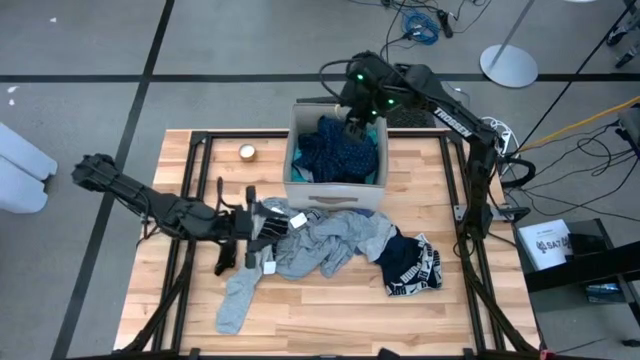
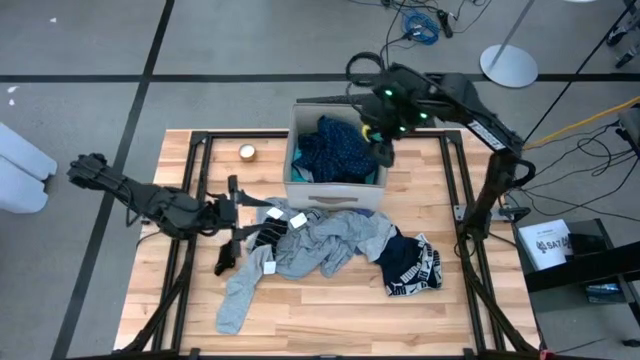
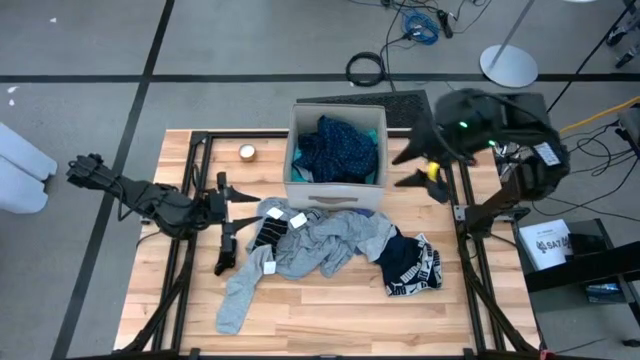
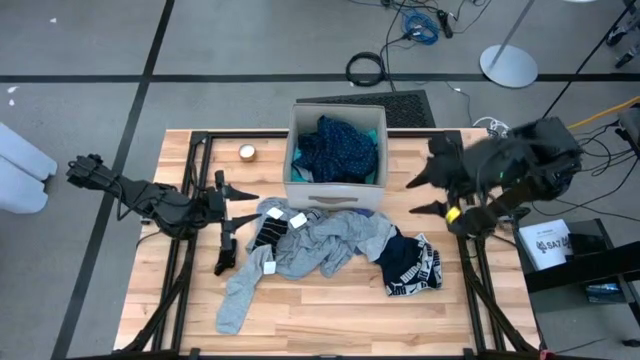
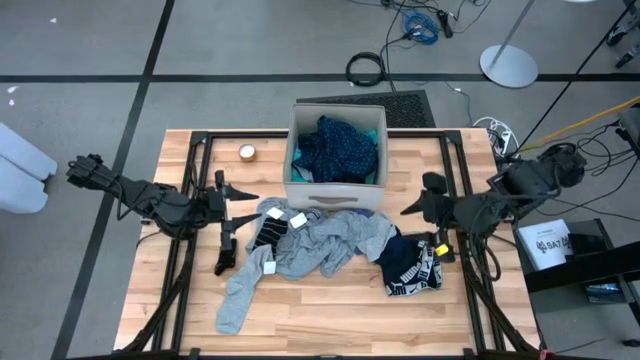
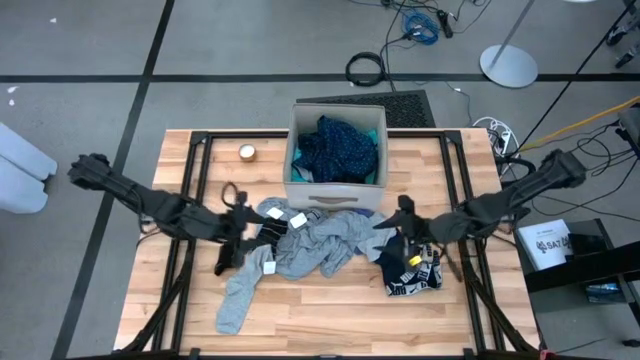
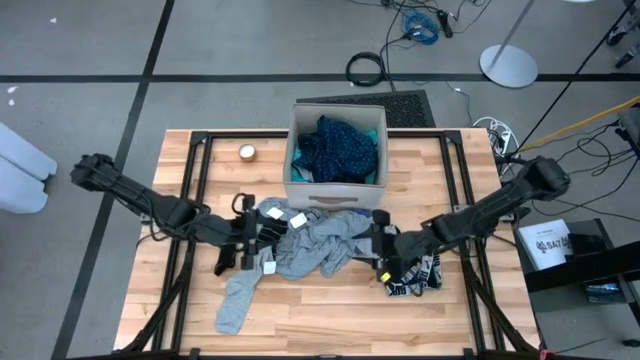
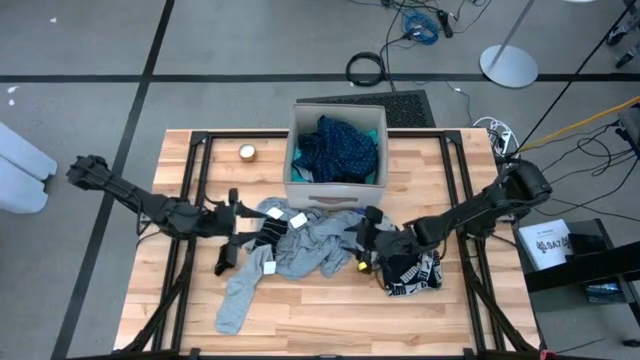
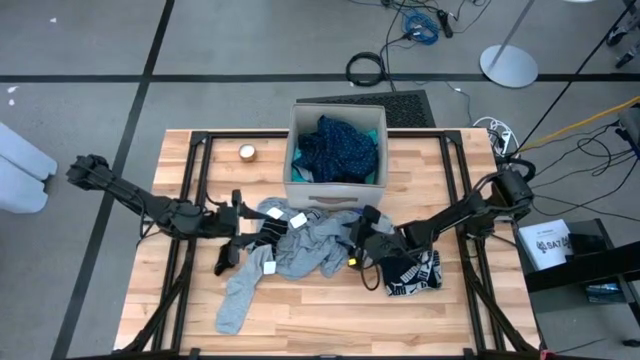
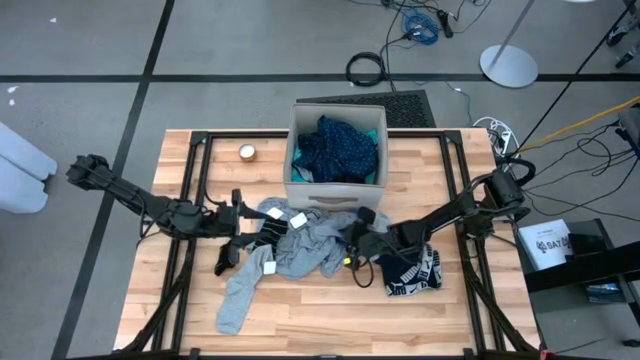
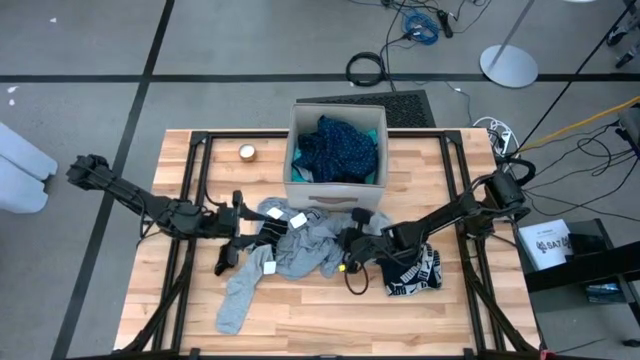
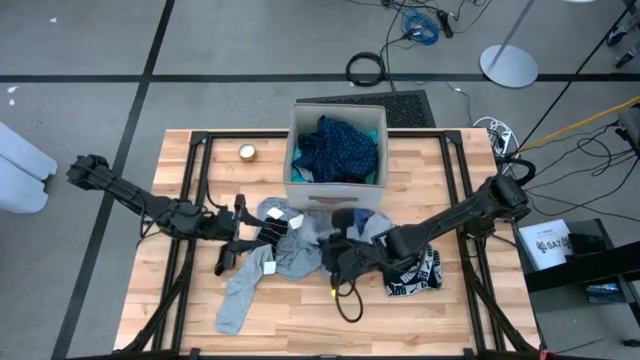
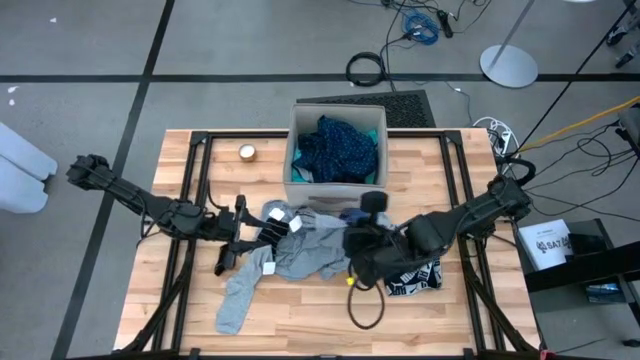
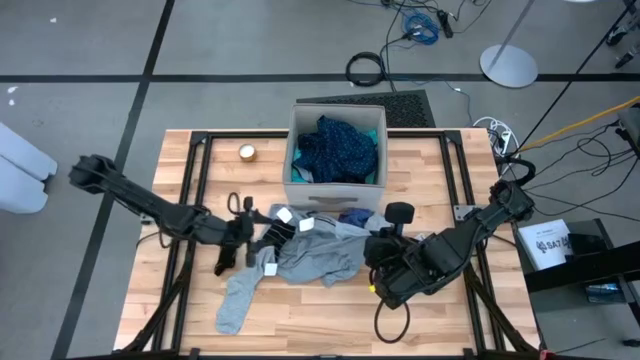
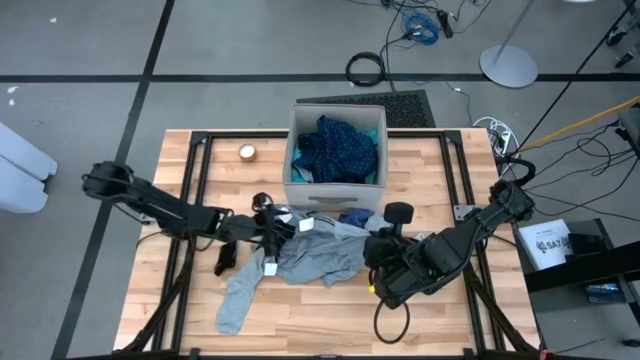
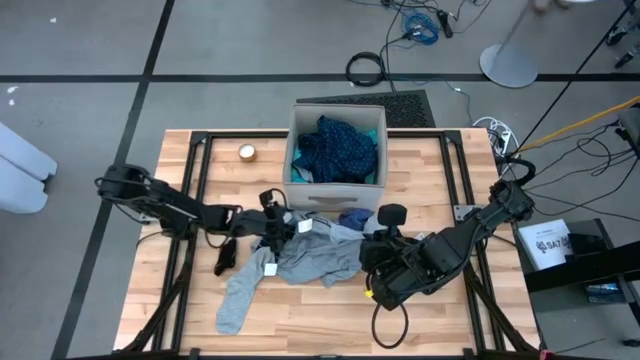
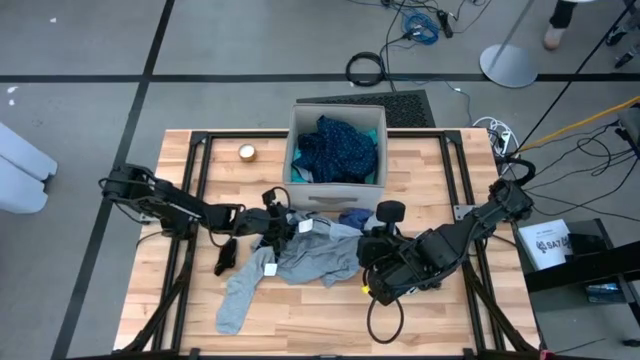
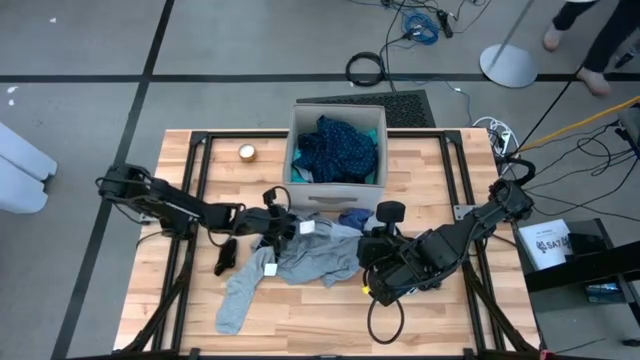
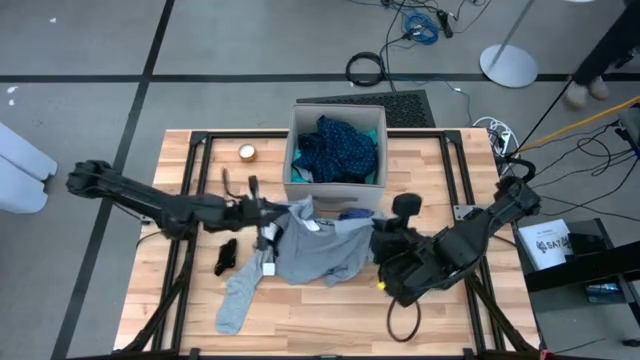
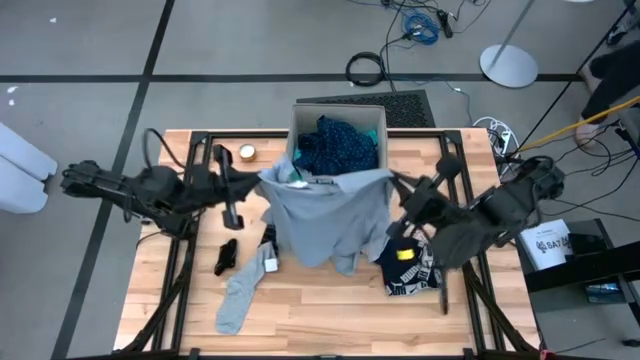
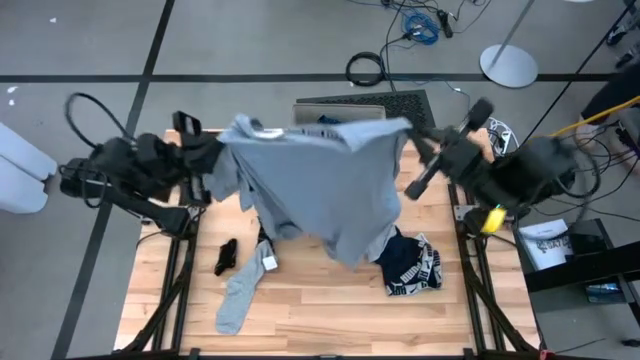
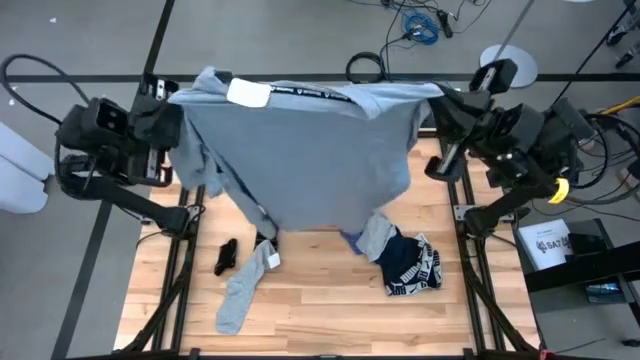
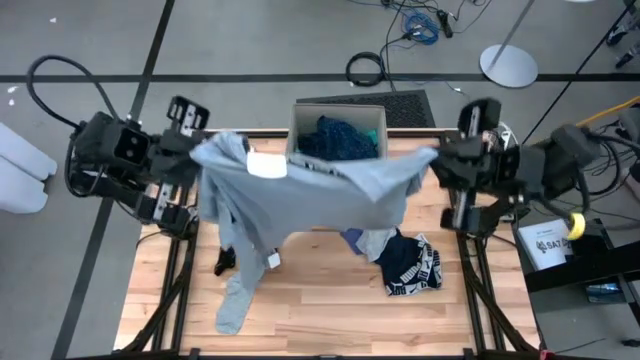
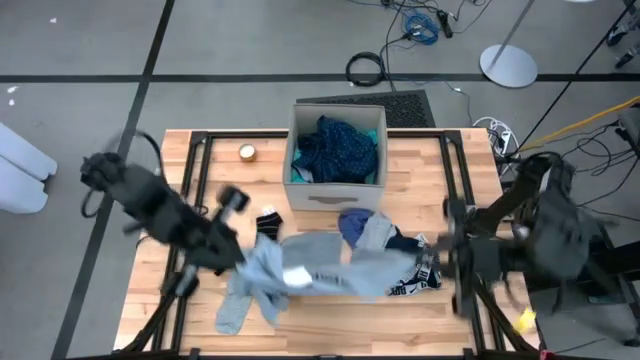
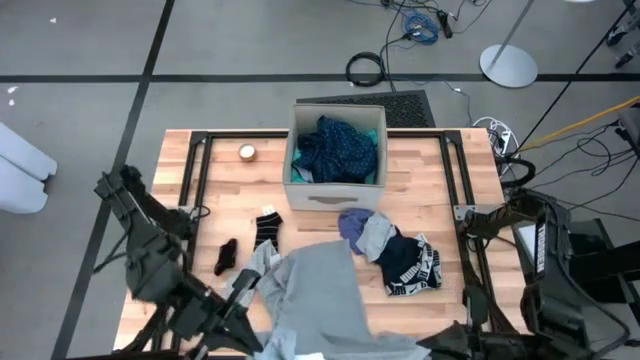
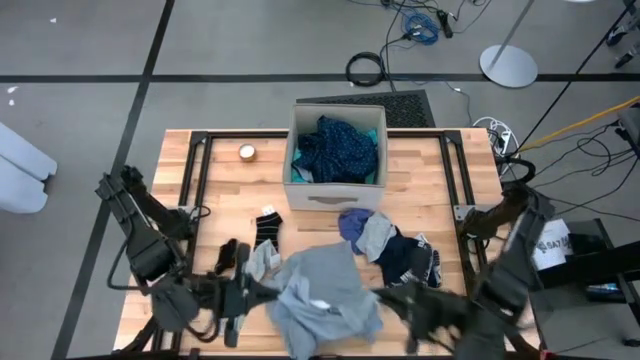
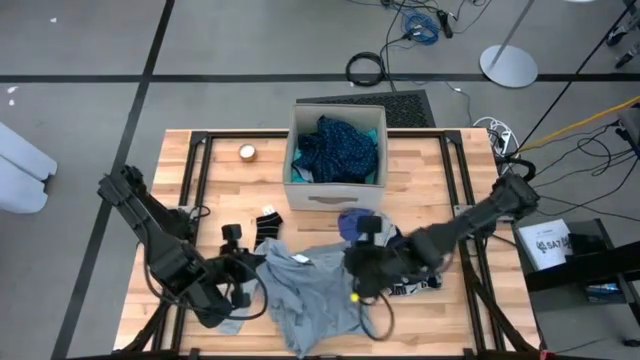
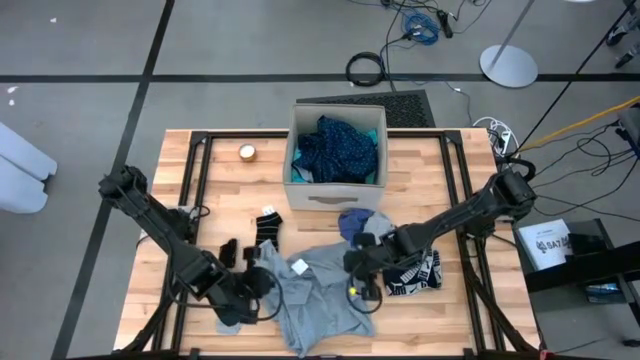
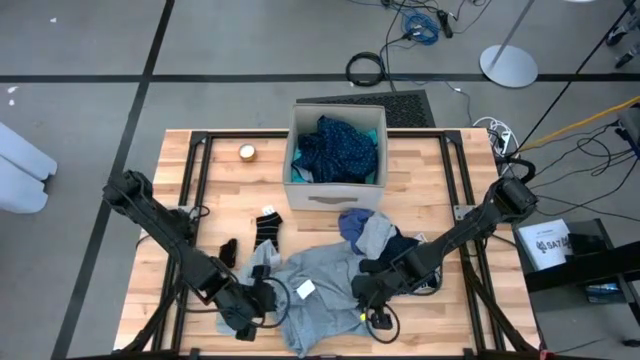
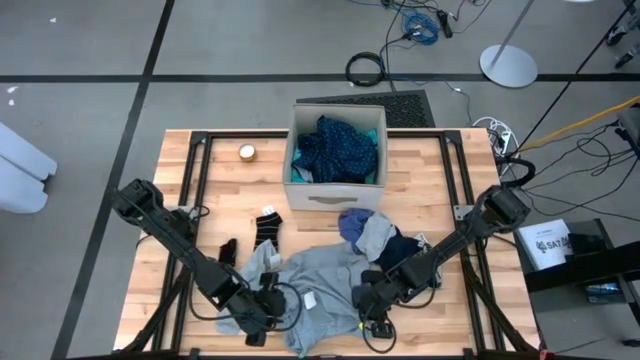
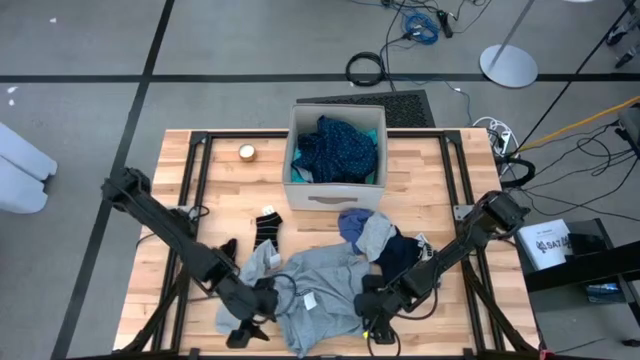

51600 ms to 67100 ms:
Task: Sort clothes
Put the gray shirt into the laundry organizer

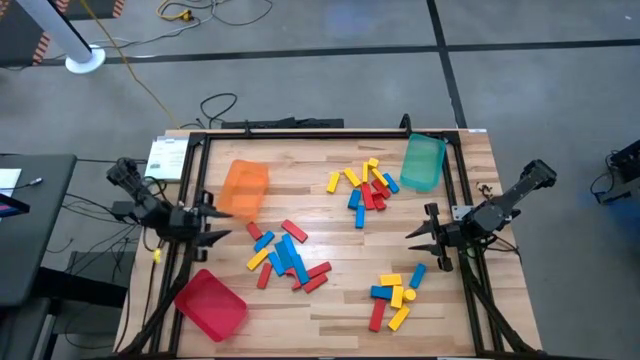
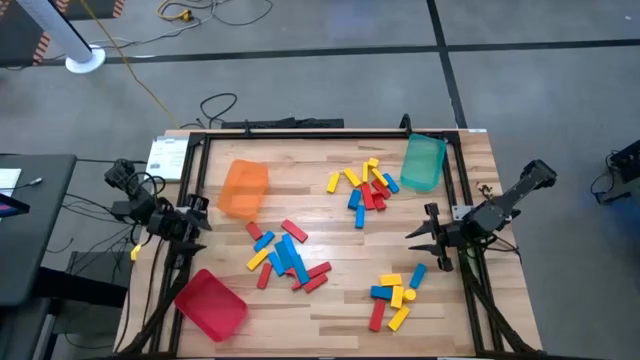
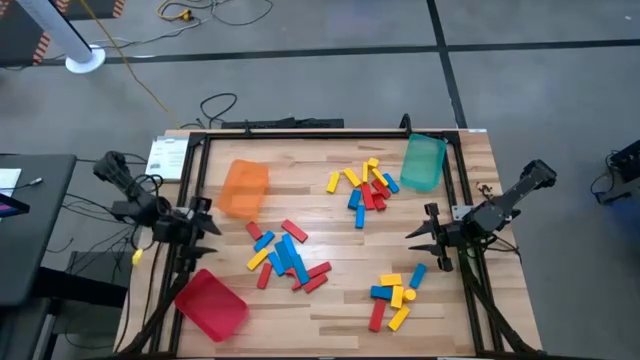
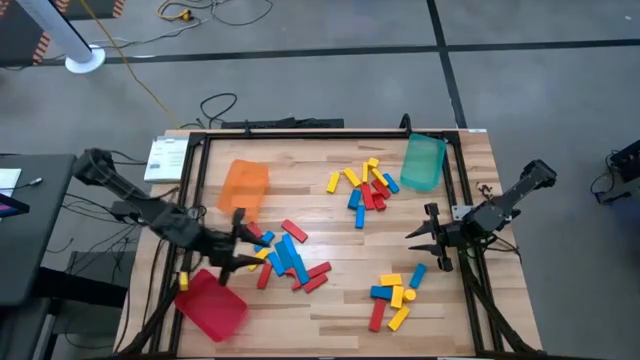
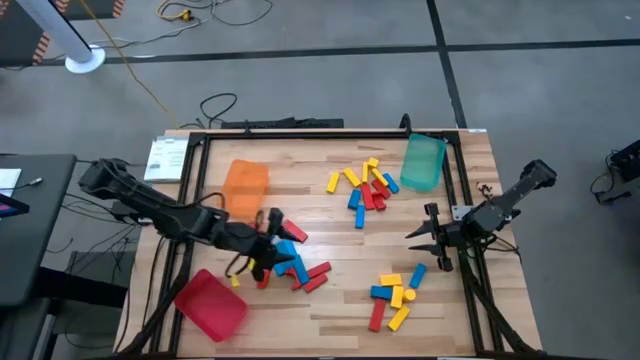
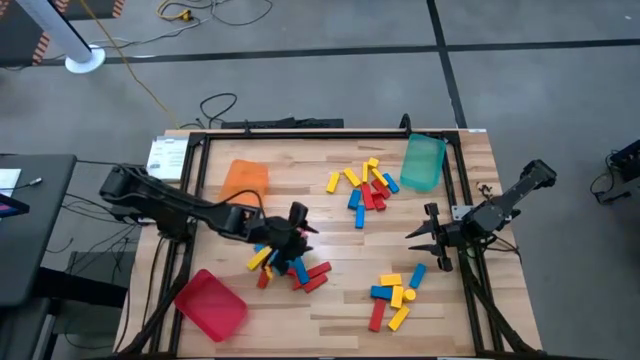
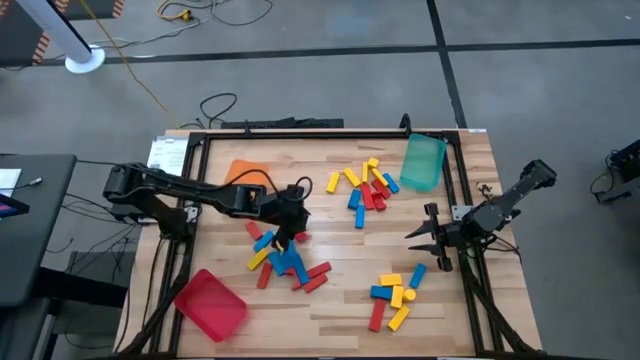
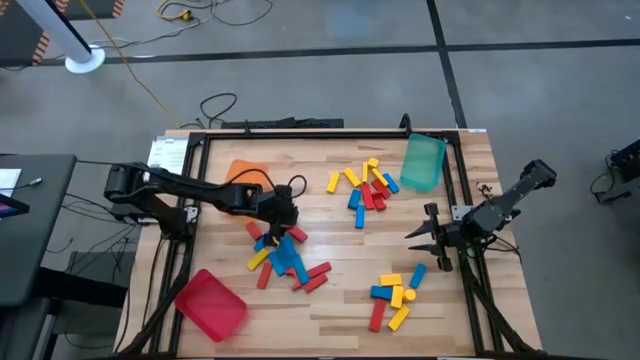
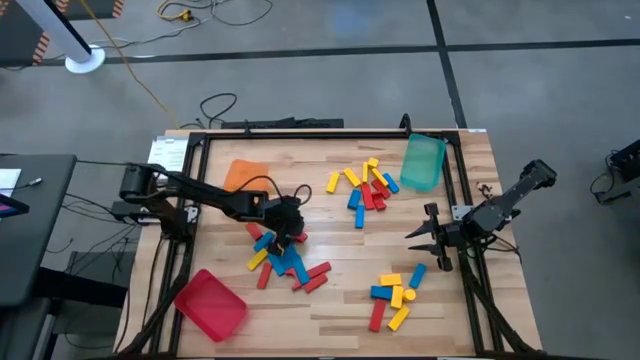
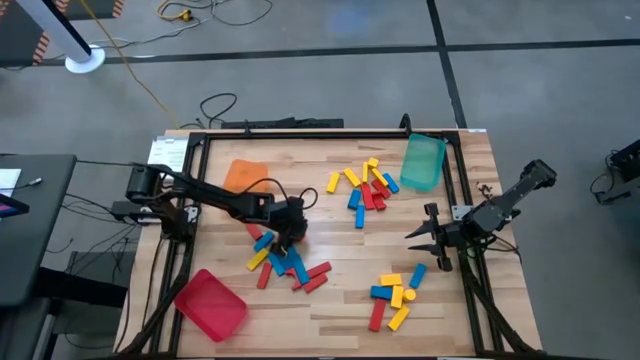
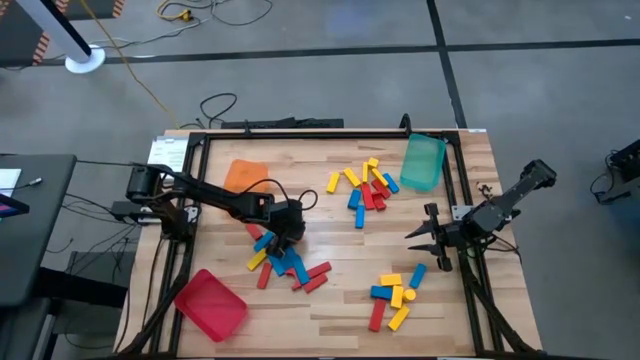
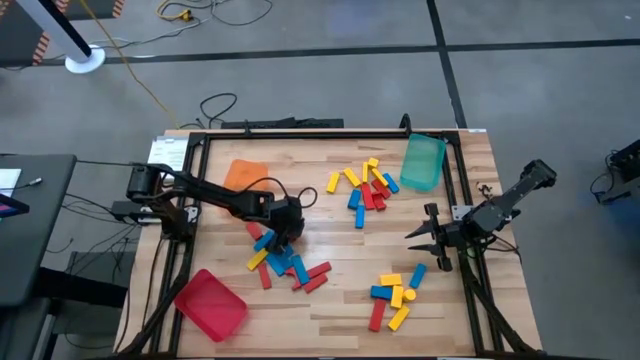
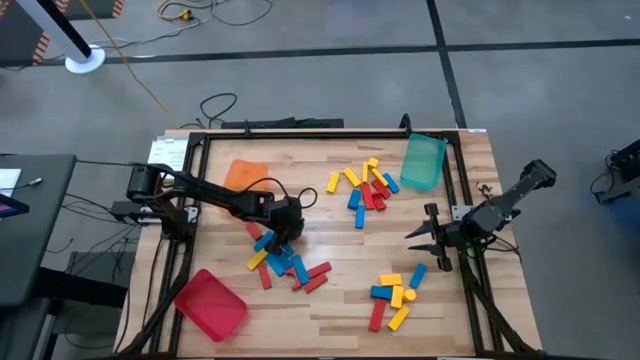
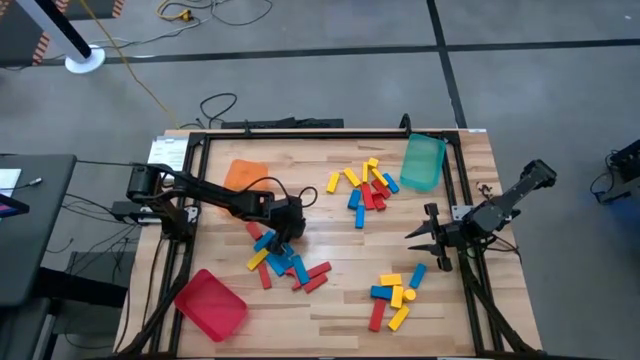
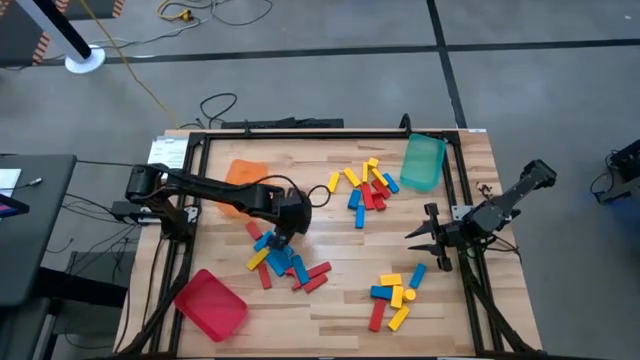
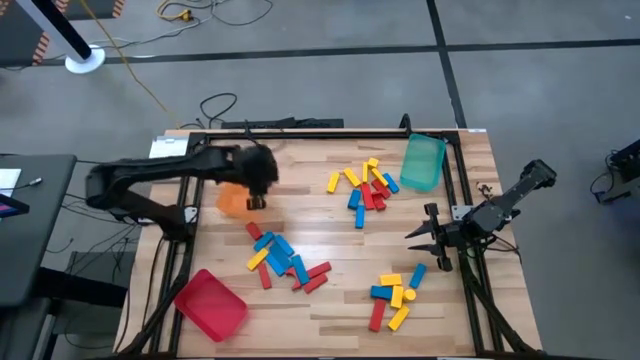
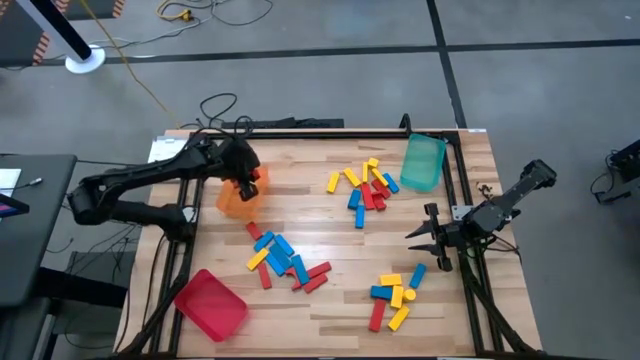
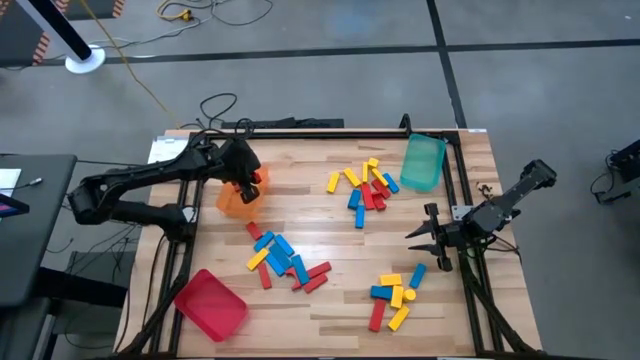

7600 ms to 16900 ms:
Task: Sort blocks
Put the red wooden block into the orange bin
